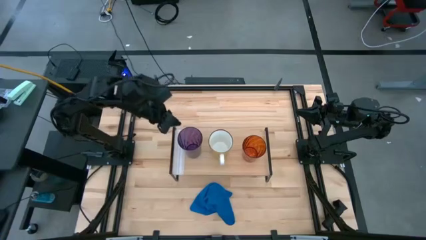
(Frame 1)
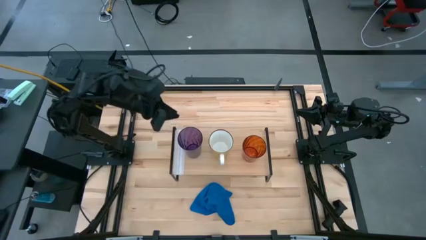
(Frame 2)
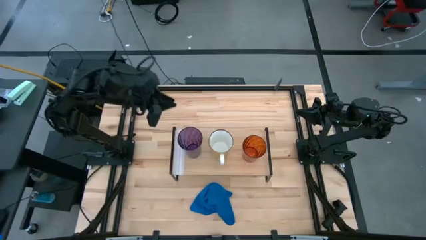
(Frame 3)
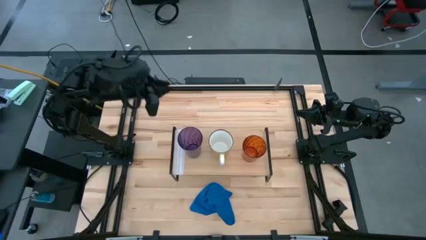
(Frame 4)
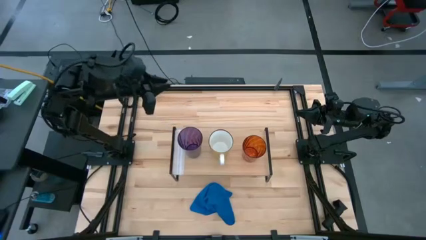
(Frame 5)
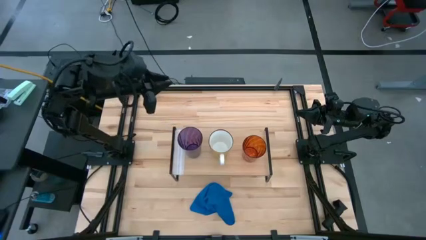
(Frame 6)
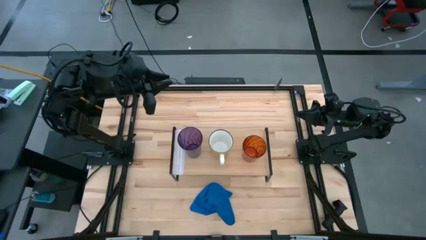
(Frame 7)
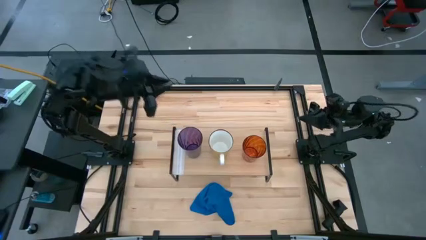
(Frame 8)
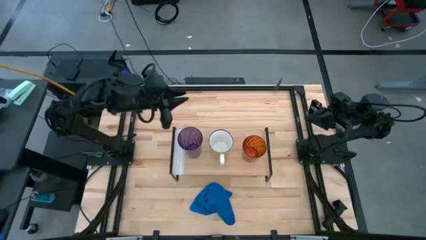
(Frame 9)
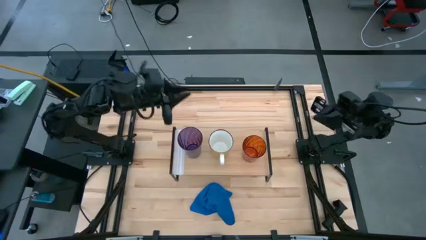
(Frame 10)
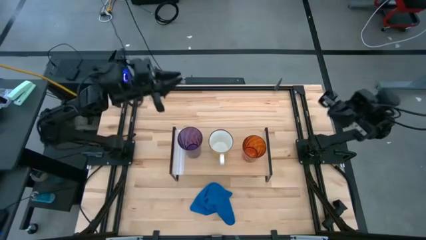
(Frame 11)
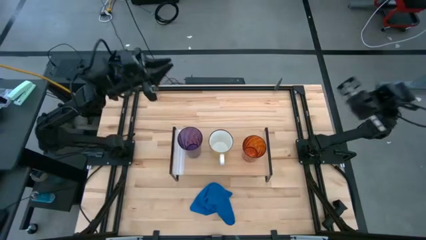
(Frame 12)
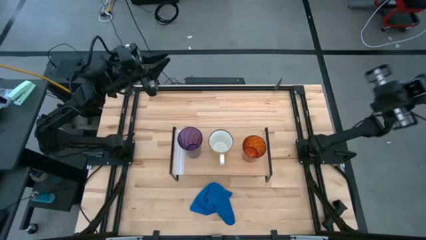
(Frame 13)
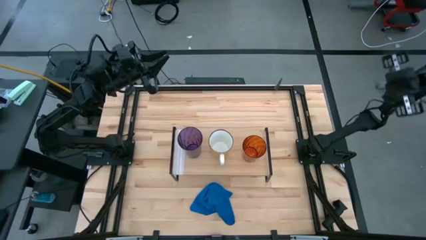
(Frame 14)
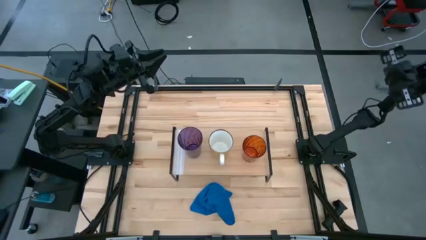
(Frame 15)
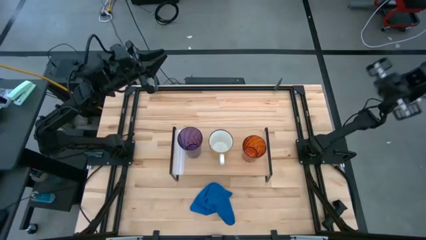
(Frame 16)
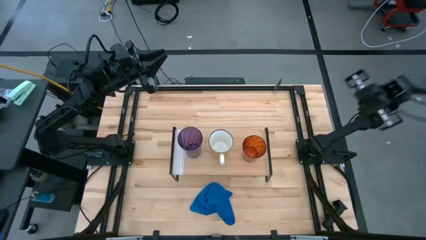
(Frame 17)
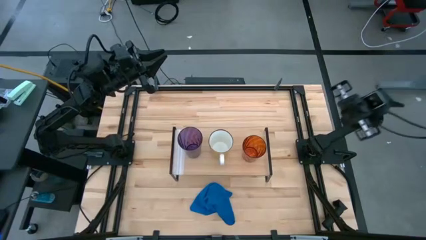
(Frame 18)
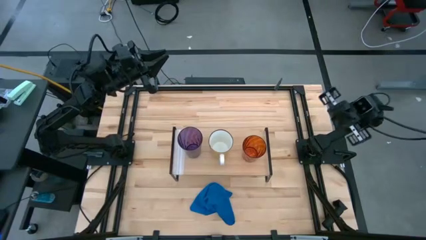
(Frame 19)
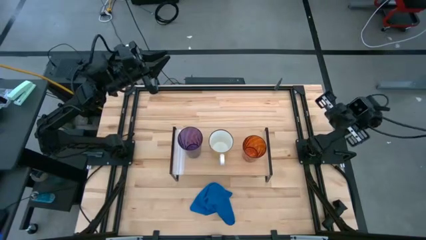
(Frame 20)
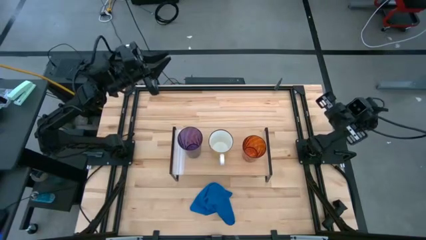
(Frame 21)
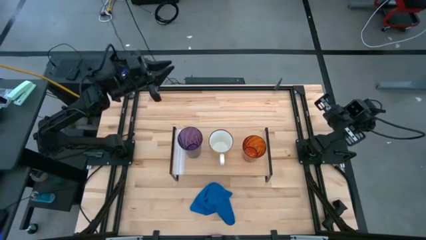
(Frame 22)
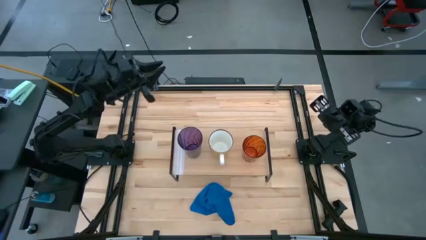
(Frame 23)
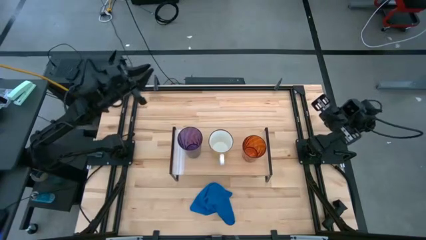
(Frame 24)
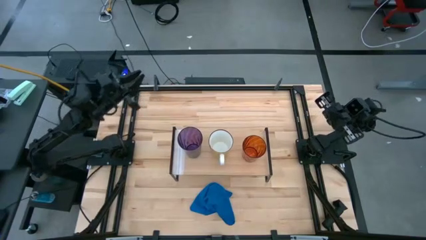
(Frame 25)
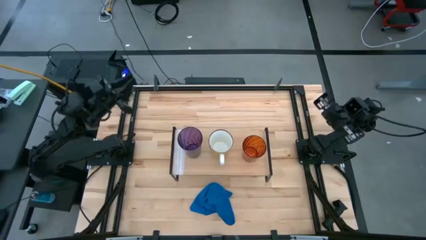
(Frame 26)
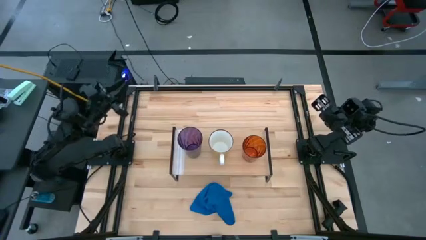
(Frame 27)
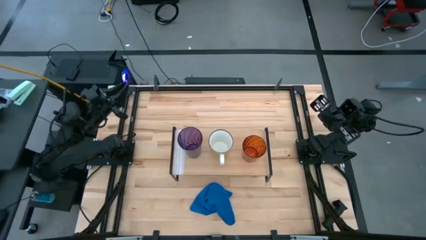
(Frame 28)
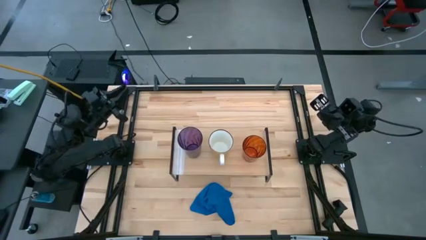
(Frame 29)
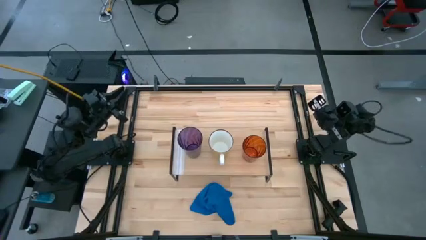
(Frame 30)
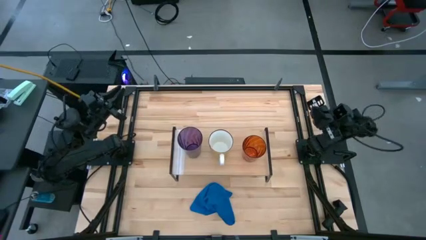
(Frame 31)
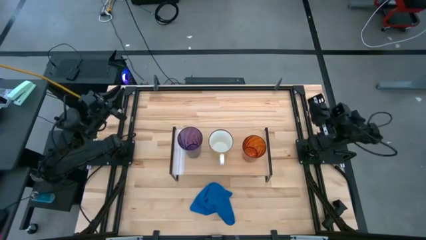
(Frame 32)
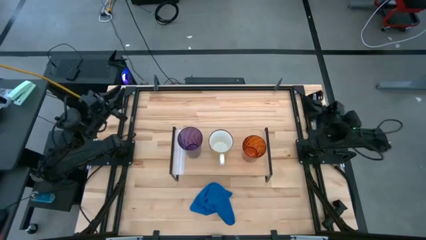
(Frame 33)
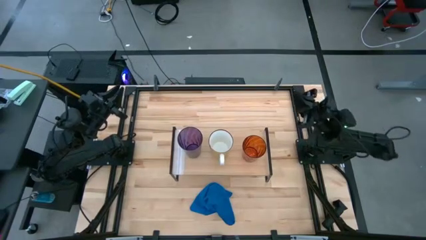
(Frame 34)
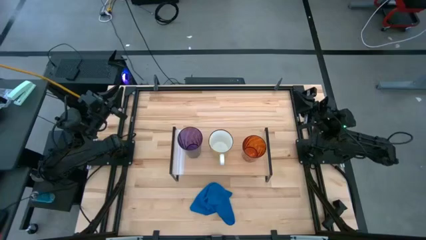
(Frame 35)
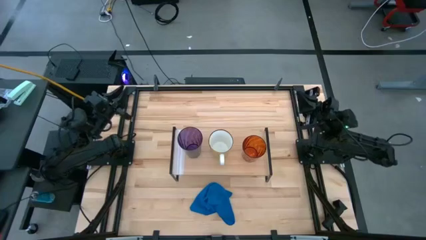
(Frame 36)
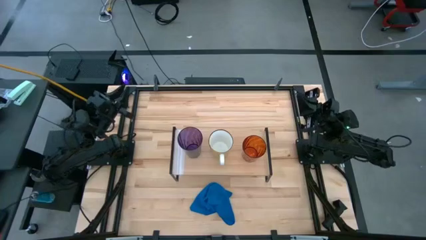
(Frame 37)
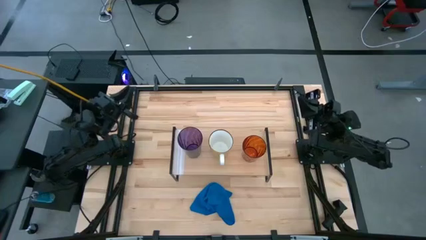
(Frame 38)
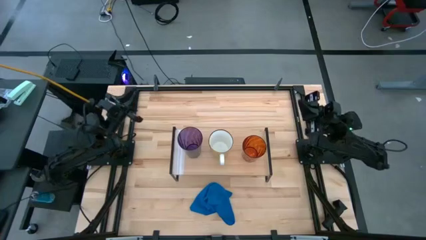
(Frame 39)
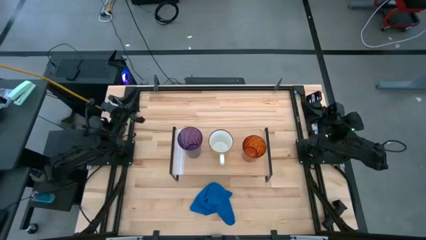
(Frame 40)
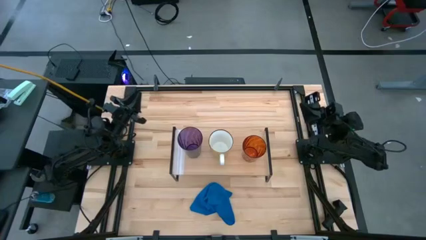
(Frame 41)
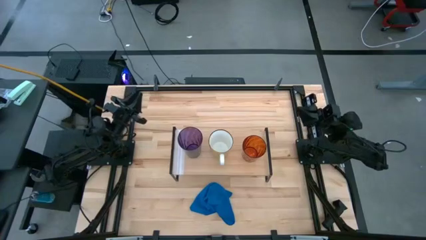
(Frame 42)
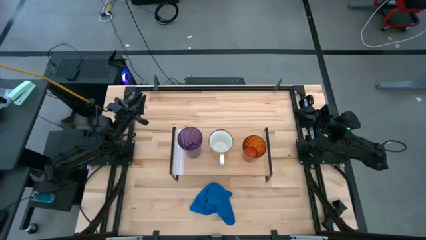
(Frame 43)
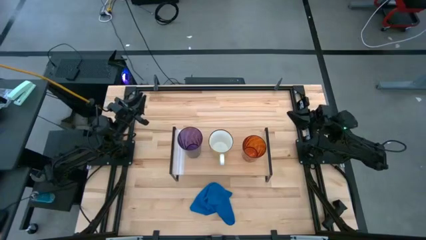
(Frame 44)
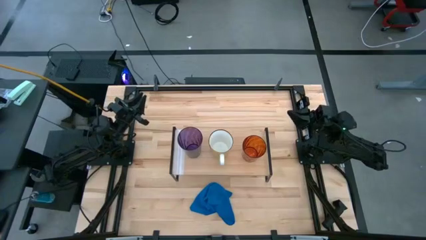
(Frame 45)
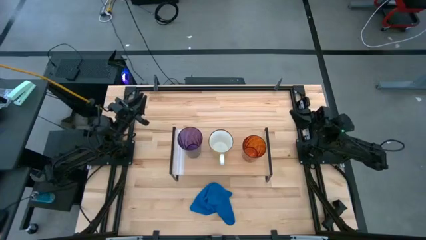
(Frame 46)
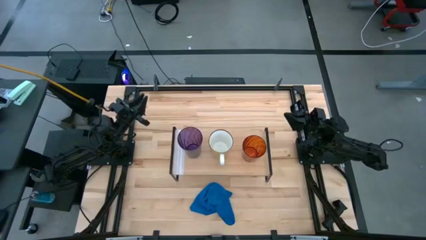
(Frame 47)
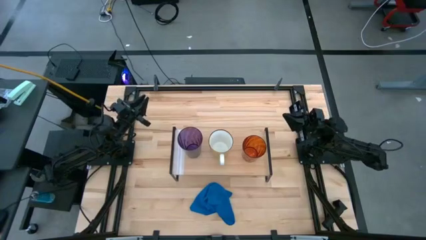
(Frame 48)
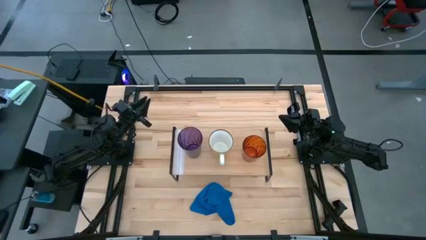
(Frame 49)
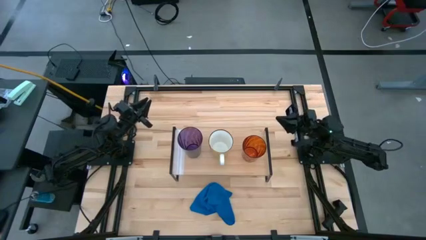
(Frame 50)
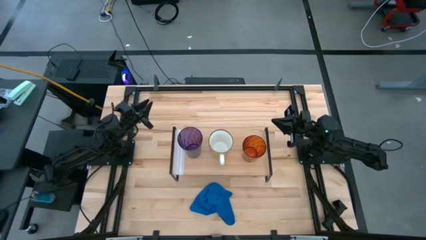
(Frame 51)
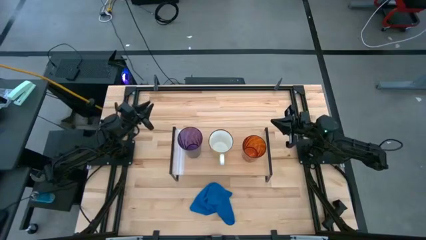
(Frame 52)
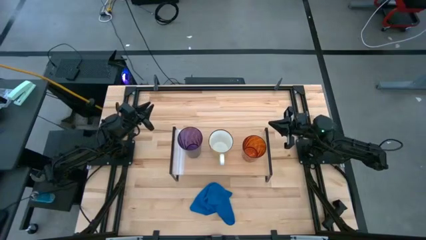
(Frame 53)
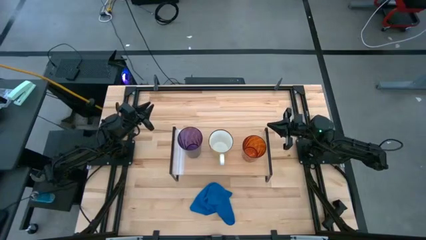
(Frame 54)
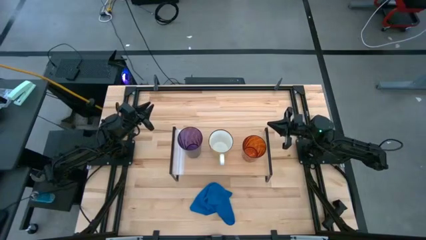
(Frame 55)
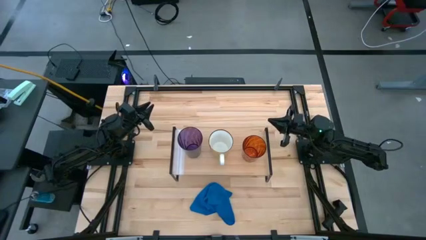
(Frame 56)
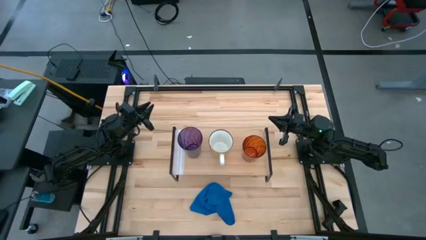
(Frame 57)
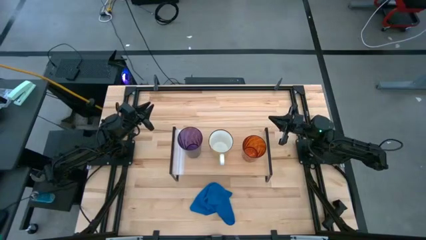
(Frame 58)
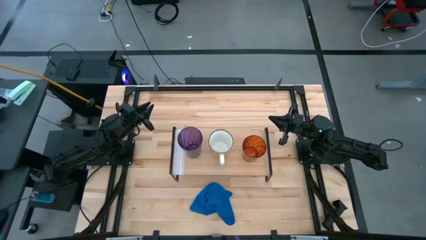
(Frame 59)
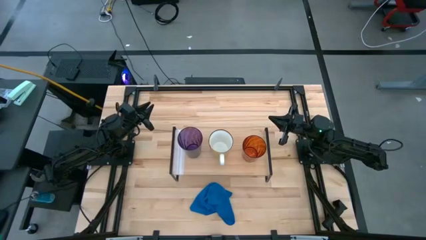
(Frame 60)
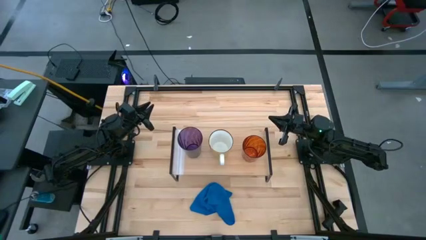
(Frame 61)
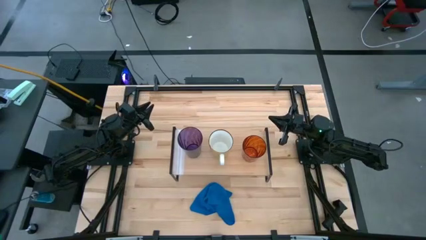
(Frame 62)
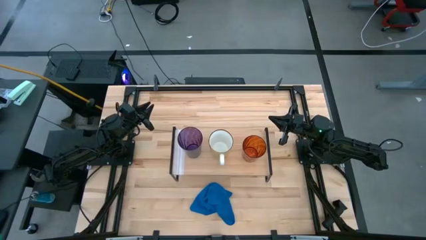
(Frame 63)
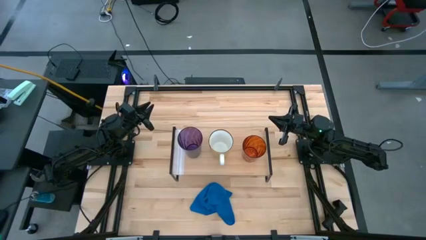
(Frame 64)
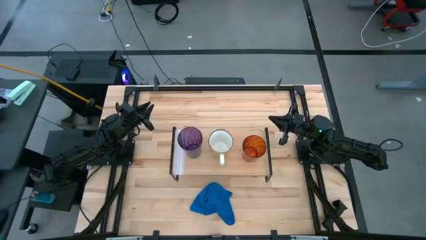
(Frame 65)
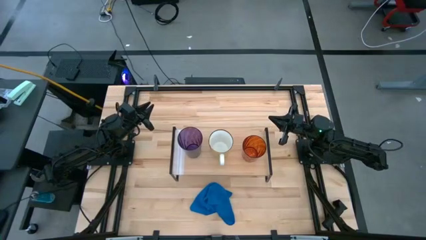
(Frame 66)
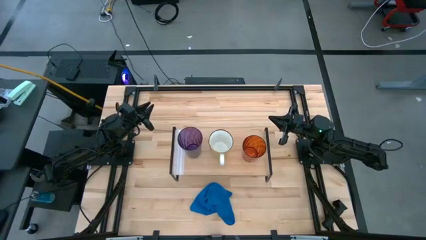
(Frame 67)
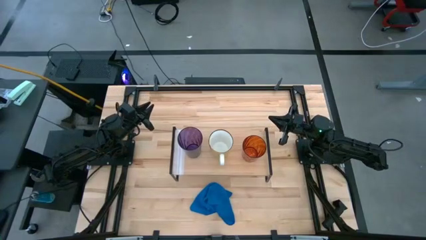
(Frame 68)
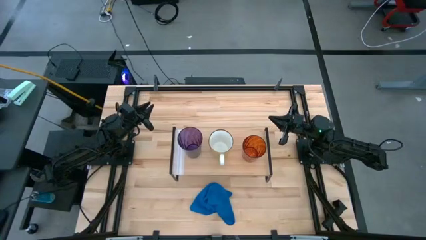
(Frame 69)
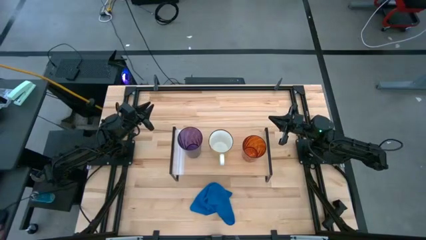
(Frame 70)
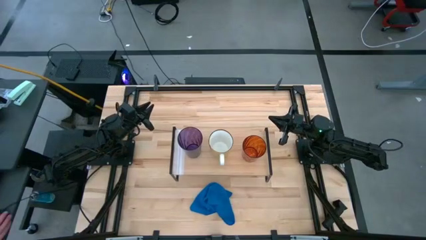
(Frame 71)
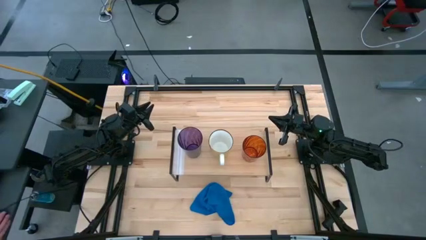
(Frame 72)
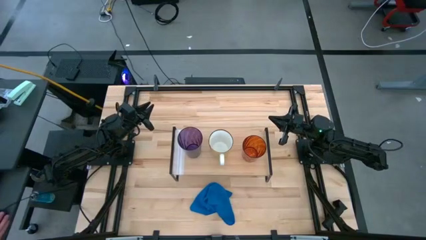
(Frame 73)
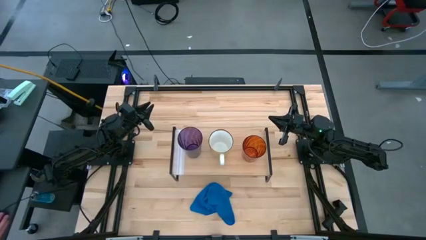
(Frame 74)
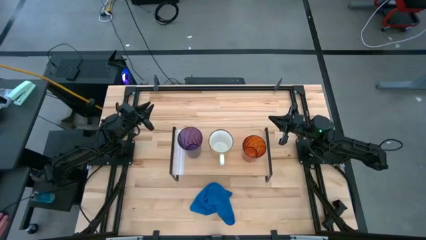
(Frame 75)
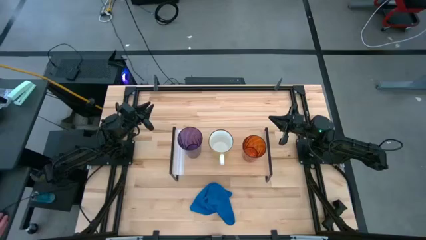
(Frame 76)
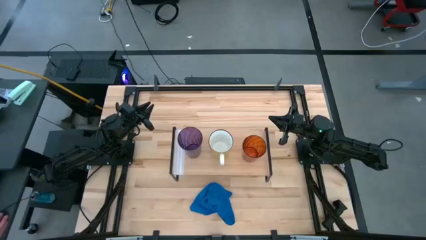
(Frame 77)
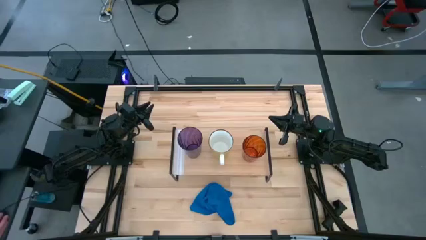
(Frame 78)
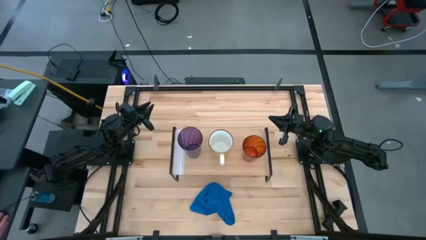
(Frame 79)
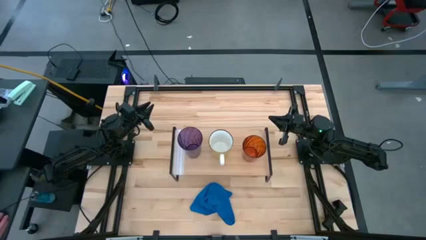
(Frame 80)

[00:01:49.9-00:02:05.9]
Task: Stack small to large cups/mugs on shelf
Return to Home Position

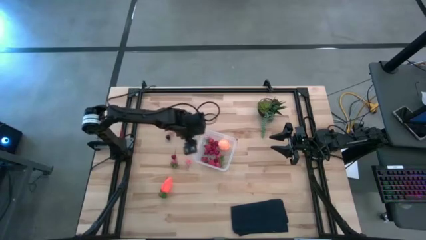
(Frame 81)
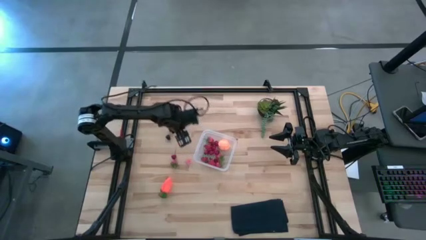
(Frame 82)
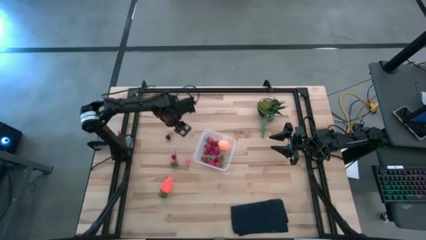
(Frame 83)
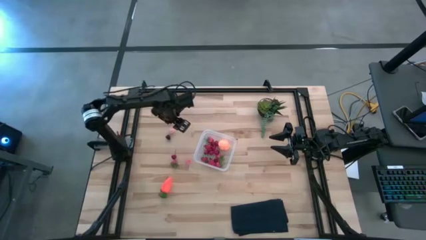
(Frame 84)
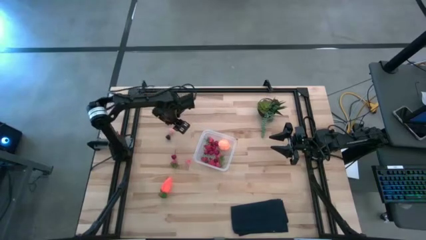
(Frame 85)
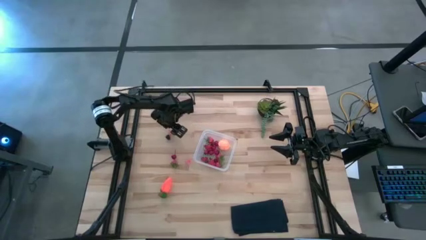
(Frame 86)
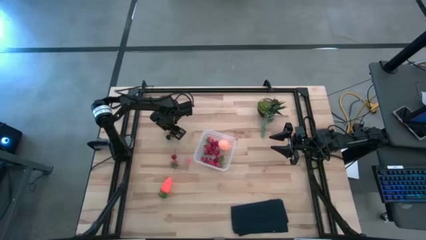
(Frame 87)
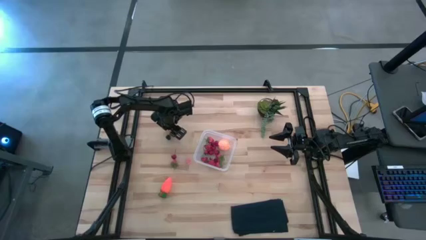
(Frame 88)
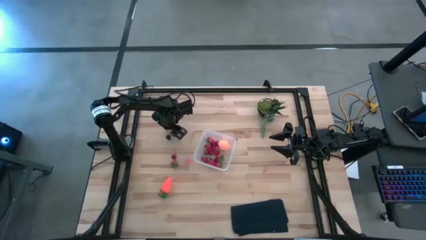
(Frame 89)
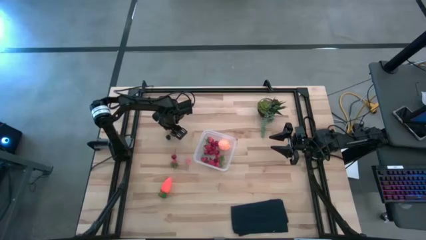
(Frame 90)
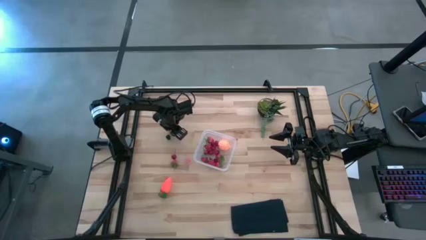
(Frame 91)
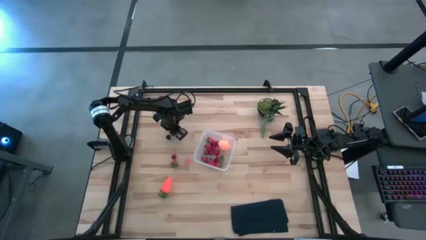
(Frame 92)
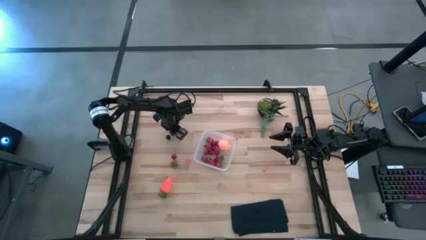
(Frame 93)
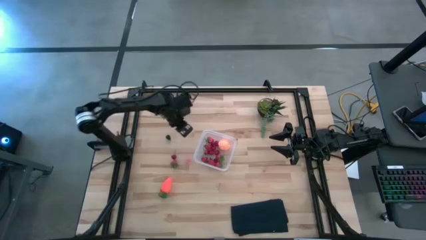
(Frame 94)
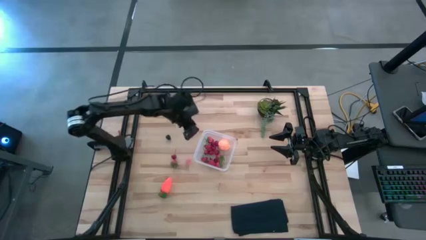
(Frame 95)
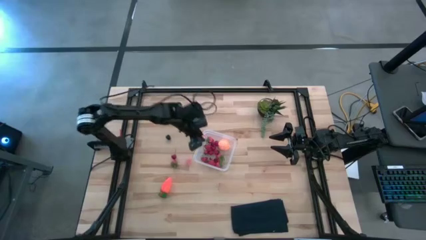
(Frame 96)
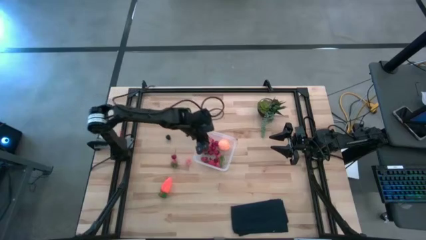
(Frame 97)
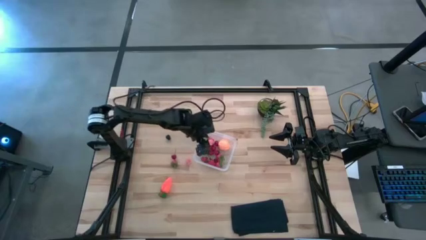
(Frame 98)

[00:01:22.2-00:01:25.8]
Task: Pick and placing Produce into tupperware
Put the top small peach into the transparent bin
